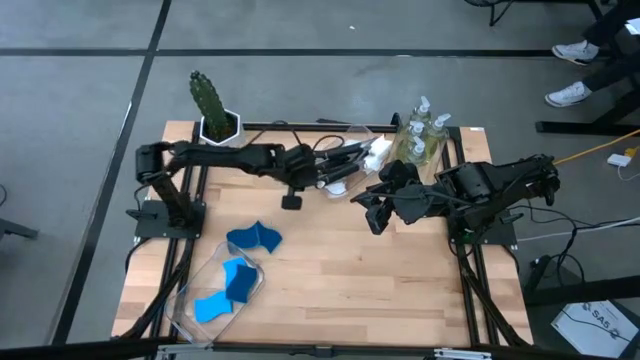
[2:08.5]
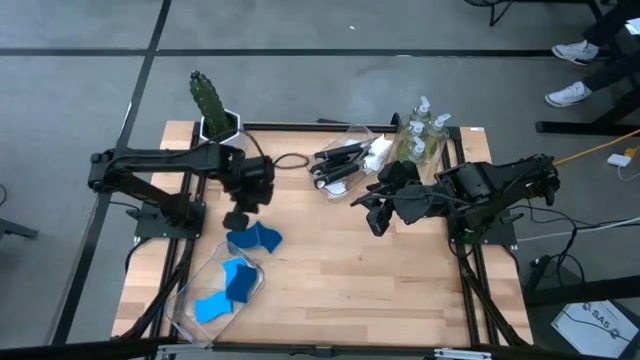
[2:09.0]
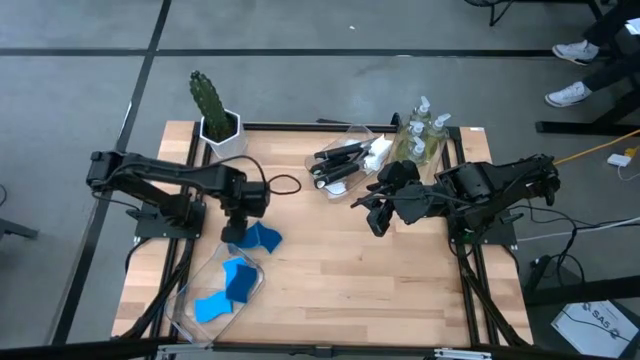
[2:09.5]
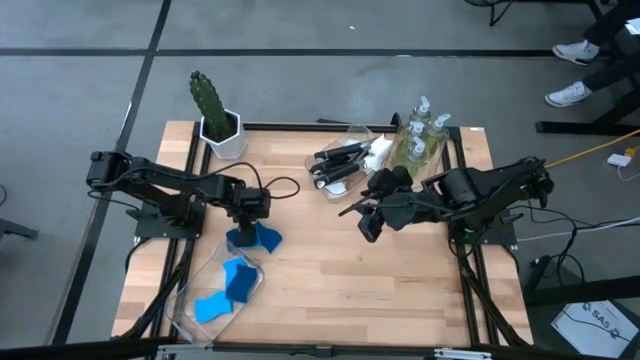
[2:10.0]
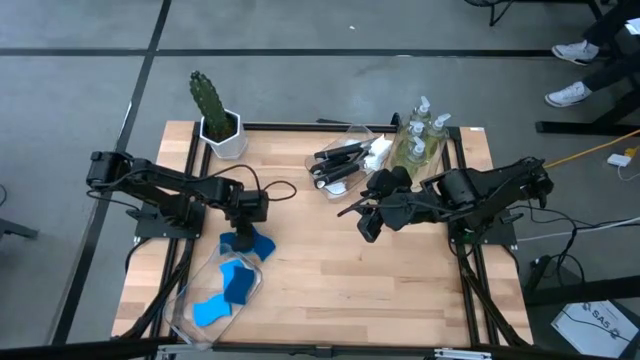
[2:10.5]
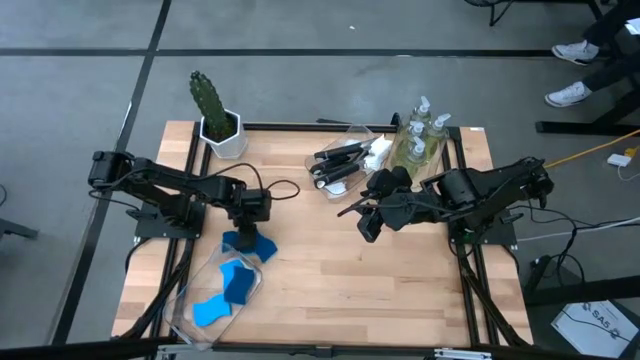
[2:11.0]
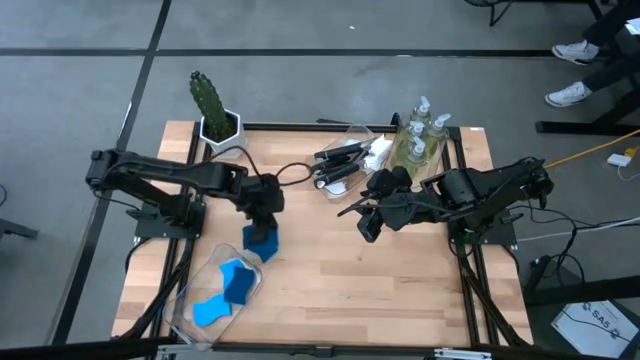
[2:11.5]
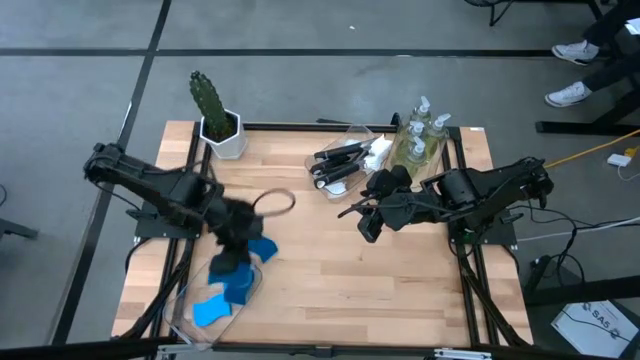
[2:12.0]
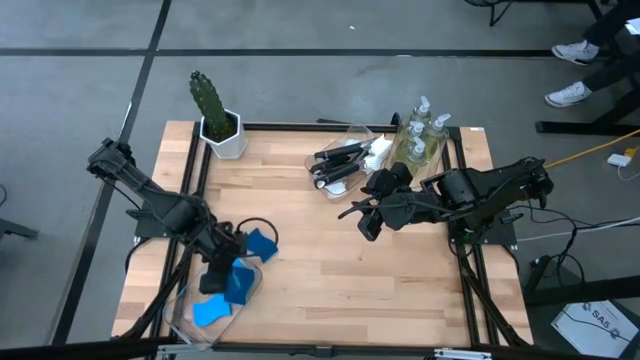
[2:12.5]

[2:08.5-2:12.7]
Task: Pick & Place Kitchen Sink Supplies
Put the blue sponge into the bottom transparent bin

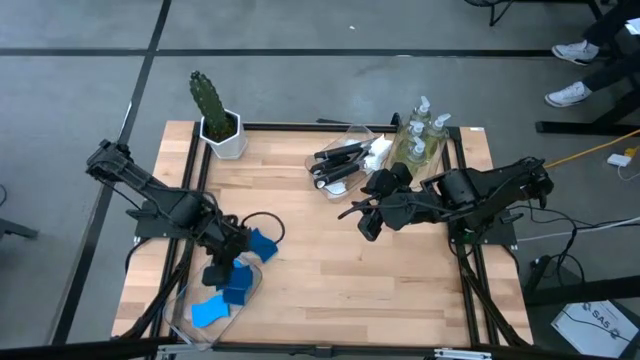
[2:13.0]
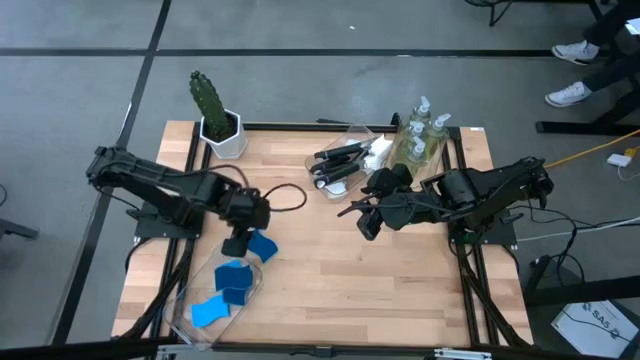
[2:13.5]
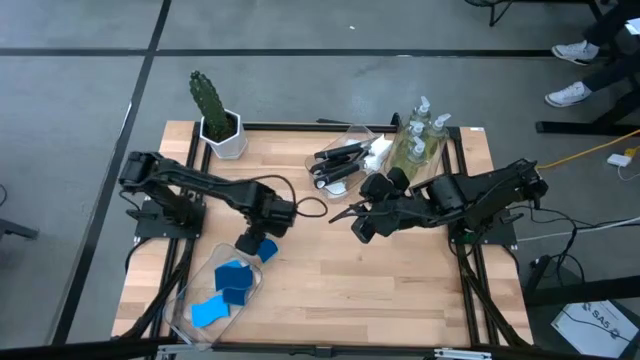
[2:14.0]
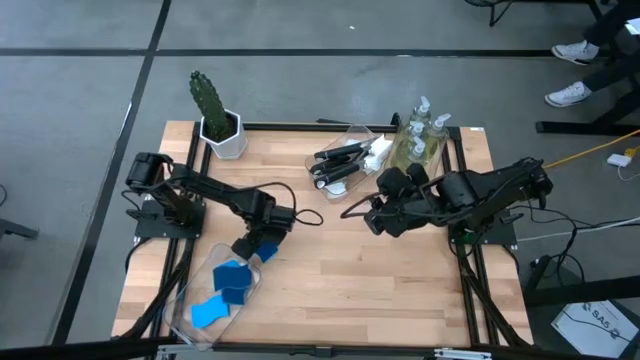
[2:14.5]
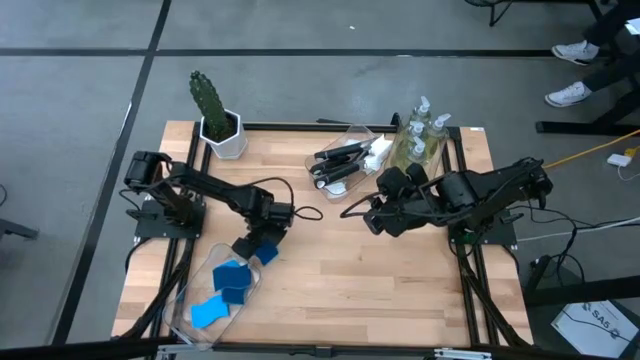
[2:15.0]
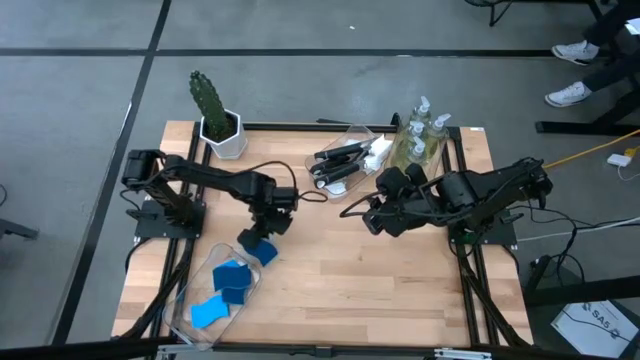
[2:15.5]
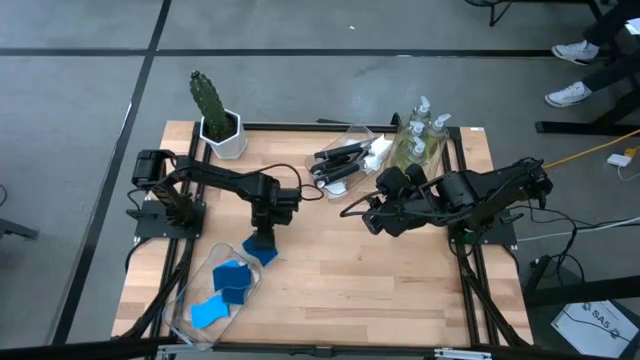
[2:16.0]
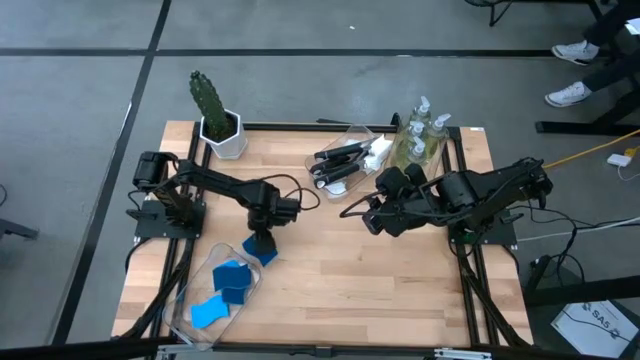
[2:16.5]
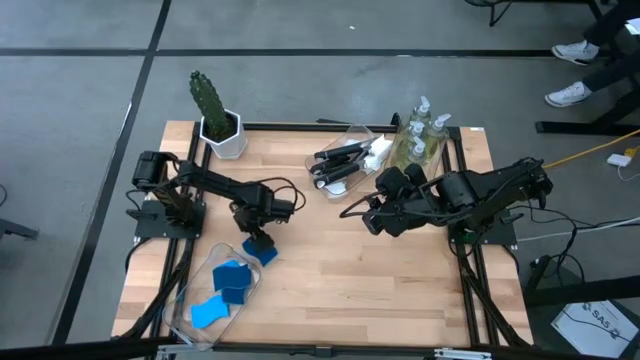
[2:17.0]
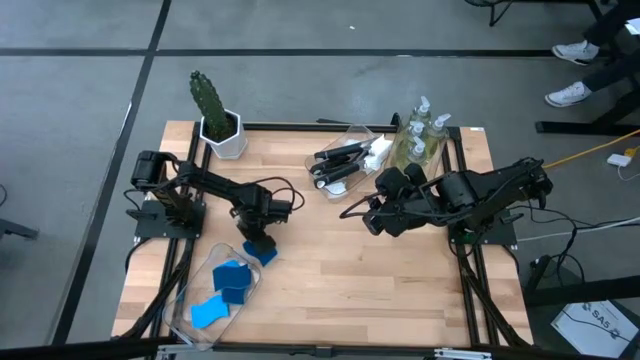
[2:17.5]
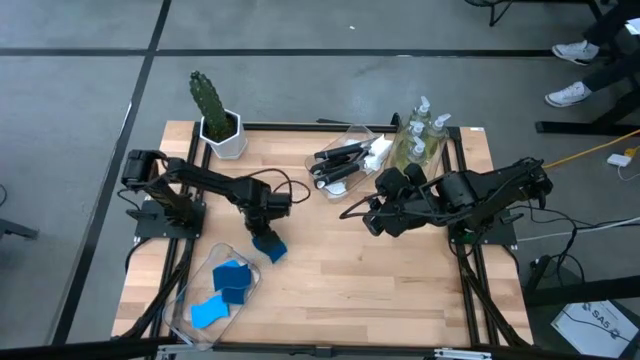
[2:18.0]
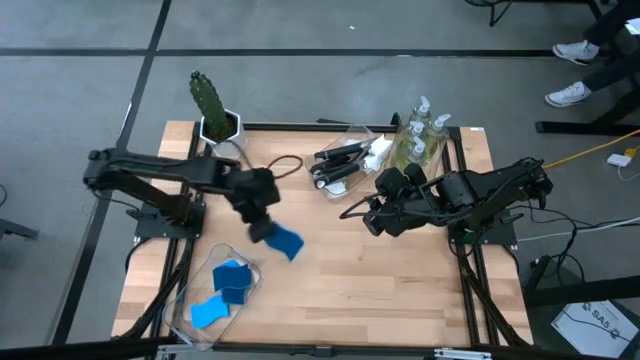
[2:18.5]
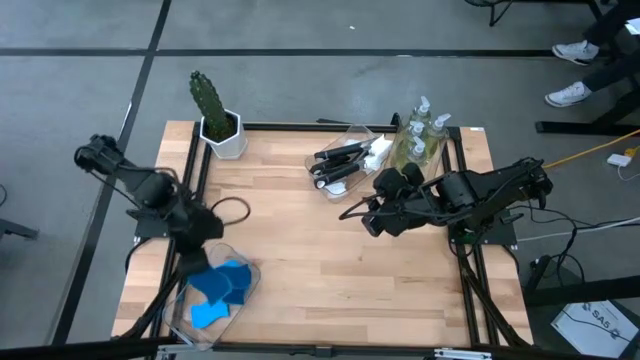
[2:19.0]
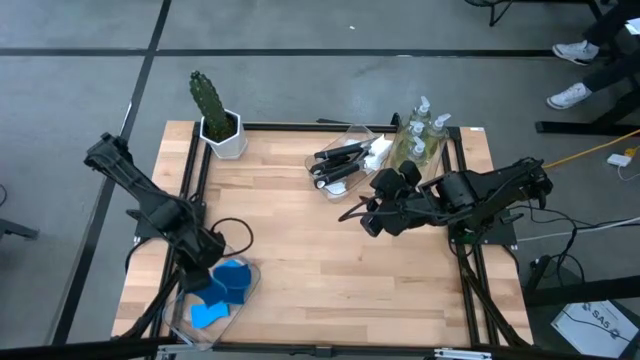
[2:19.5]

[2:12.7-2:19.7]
Put the blue sponge into the bottom transparent bin

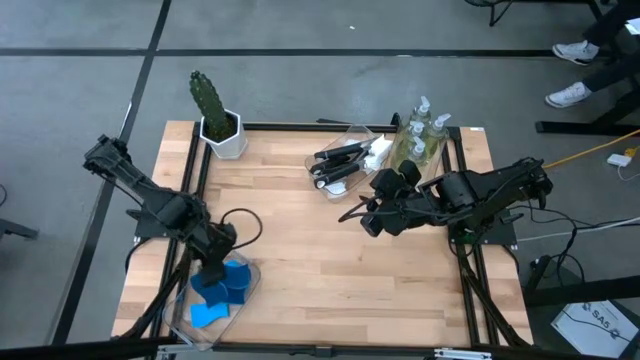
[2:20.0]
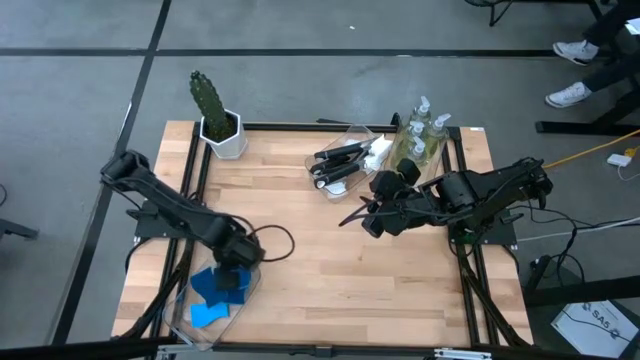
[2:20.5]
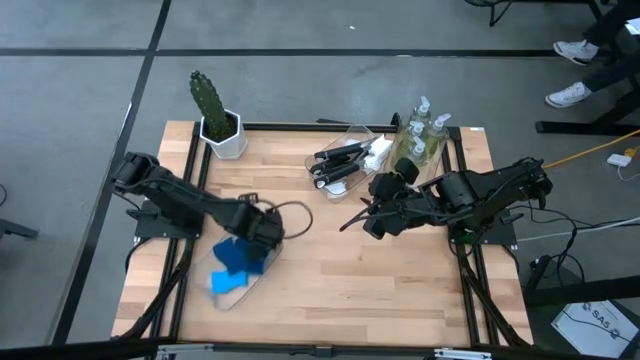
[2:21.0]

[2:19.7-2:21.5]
Adjust the bottom transparent bin
